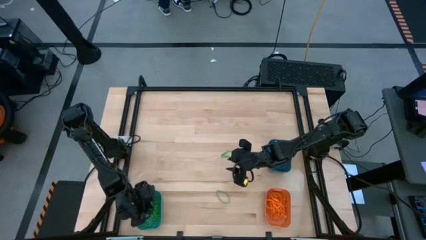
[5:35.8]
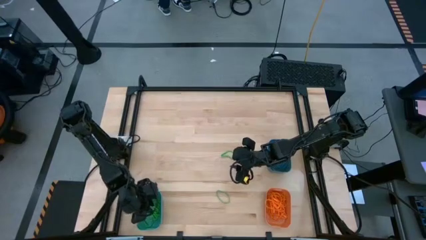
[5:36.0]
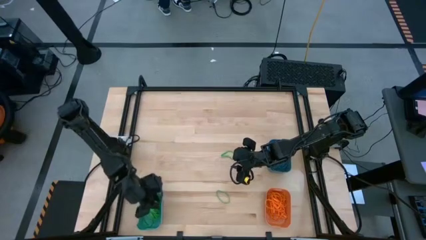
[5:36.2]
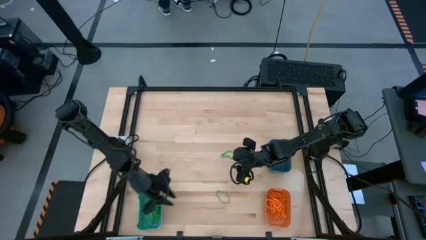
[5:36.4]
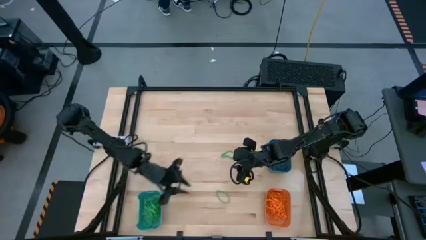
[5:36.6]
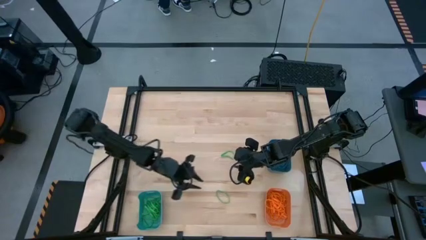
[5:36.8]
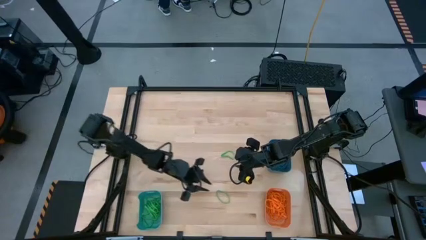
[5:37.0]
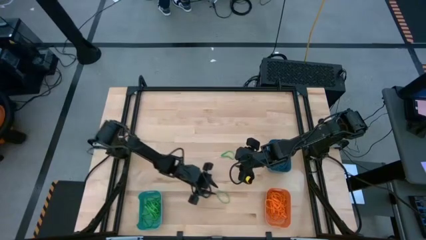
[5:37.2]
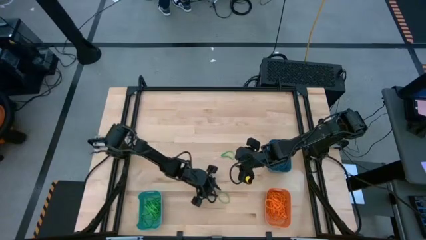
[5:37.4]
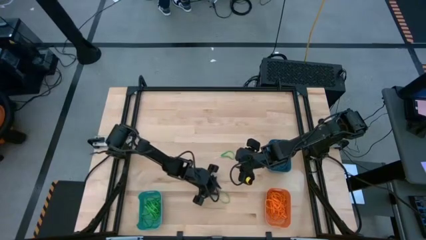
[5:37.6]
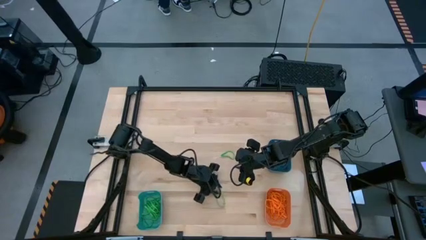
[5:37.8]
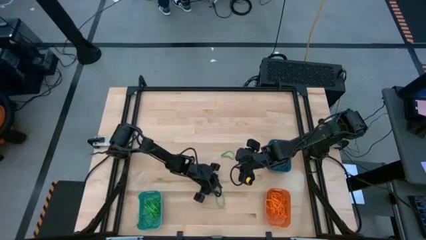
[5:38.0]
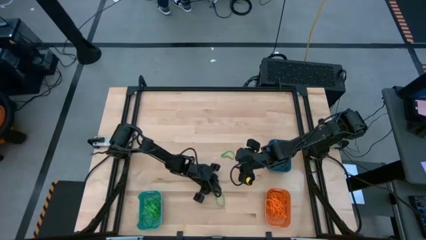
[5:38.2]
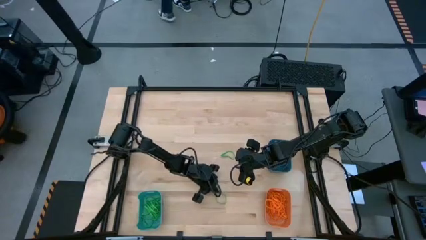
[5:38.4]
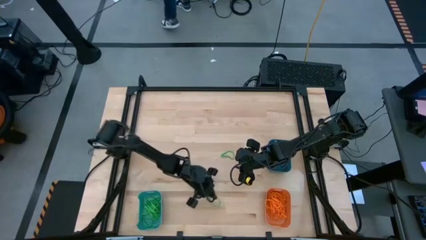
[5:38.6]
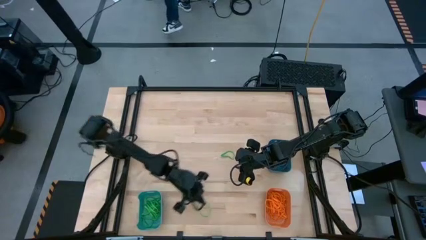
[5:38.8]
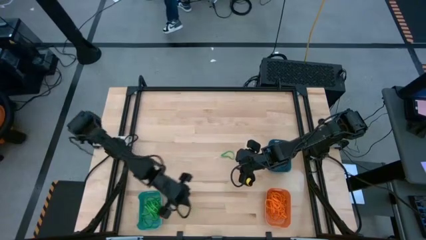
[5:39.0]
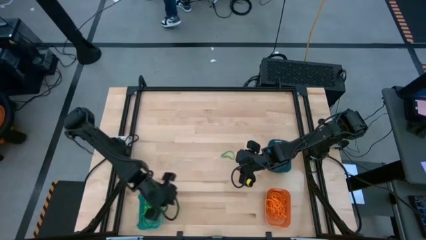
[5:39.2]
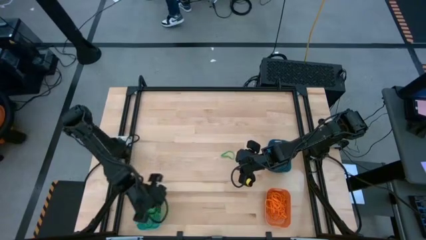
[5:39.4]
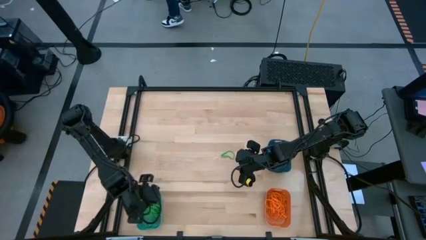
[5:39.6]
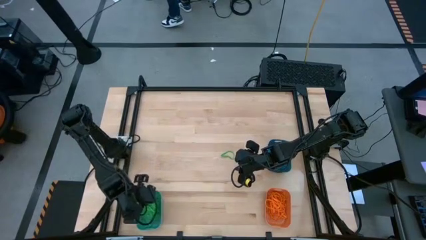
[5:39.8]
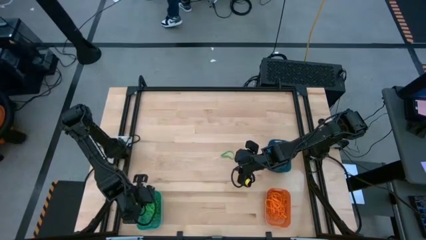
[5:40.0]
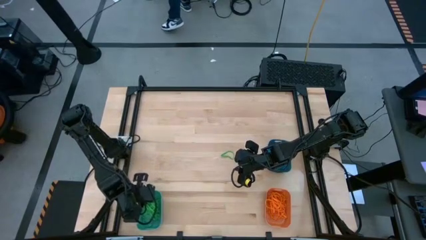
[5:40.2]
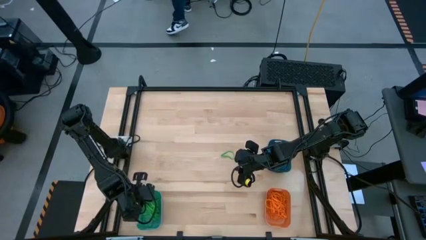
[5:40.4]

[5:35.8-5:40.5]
Task: Sort rubber bands into baskets
Put the green rubber band into the green bin

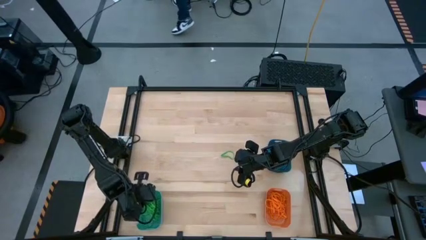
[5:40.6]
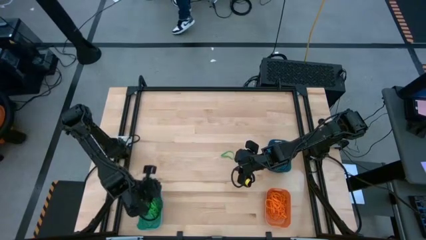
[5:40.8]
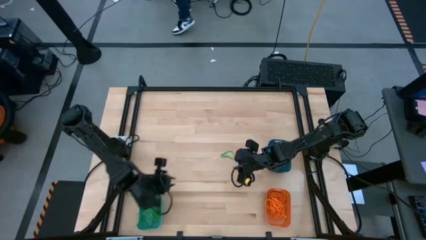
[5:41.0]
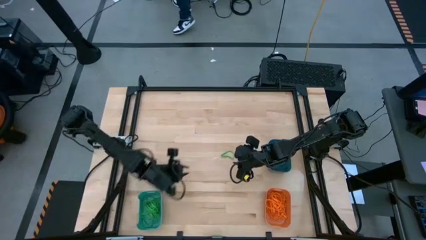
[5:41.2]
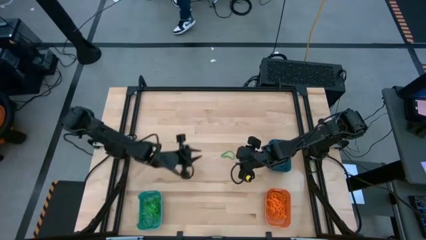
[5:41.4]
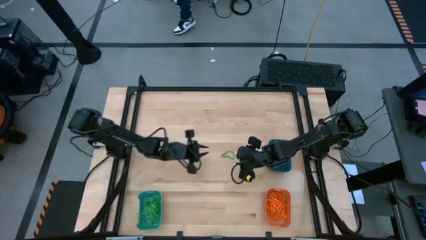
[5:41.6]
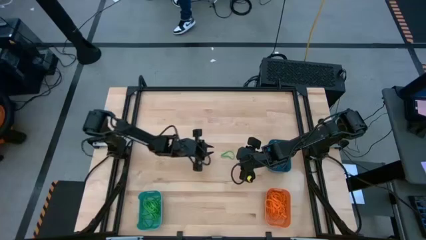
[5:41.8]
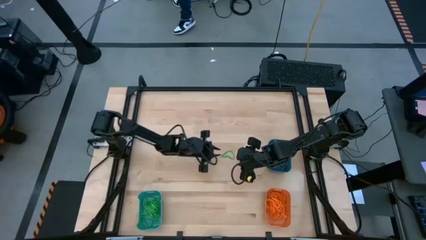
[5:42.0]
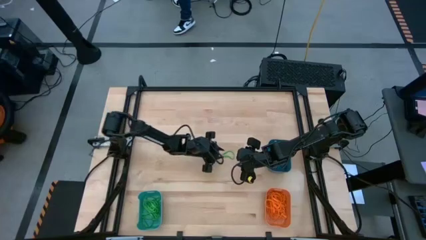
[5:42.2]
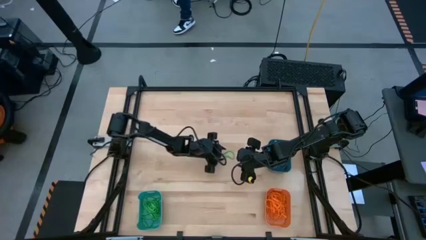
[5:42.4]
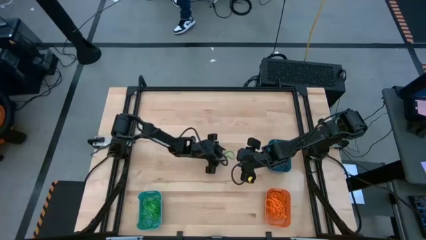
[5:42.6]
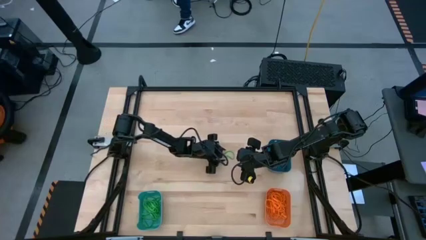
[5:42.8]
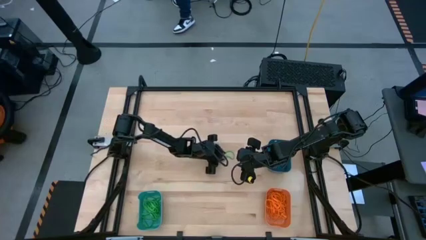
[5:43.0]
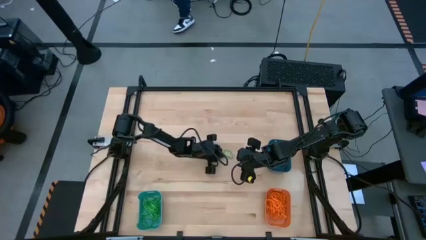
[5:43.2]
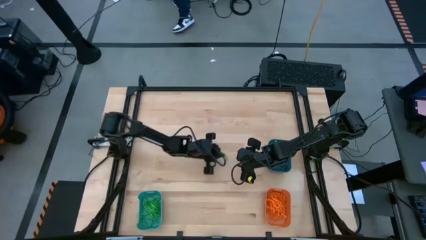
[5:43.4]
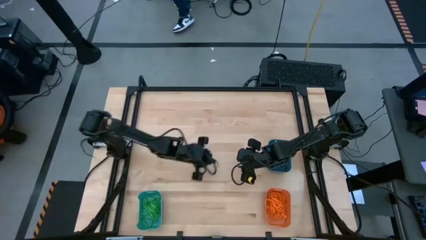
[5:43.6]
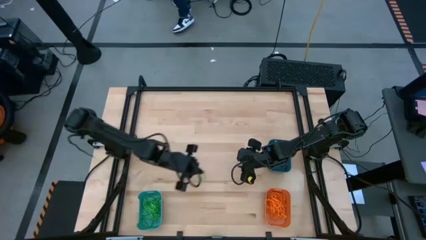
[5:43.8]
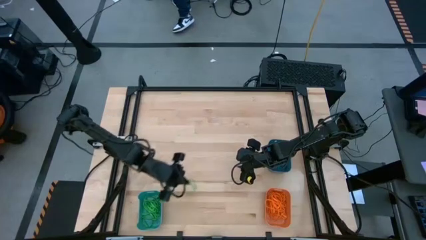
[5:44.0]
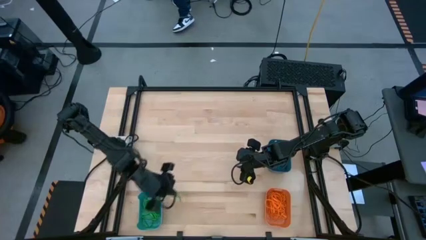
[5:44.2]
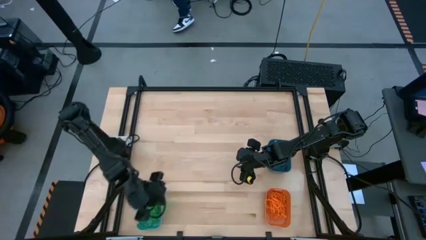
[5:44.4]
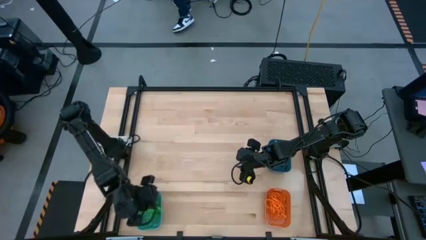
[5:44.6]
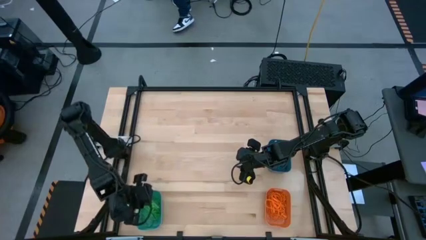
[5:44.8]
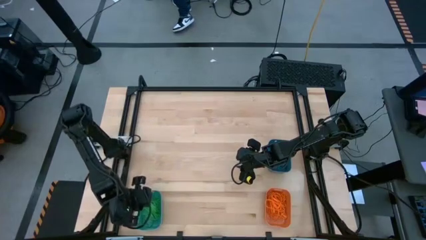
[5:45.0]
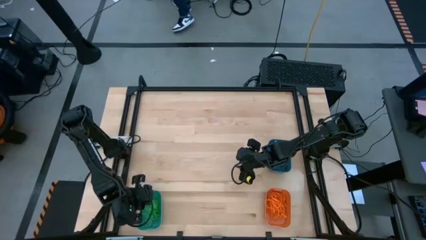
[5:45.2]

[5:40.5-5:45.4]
Put the green rubber band into the green bin

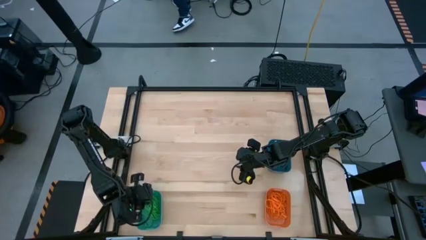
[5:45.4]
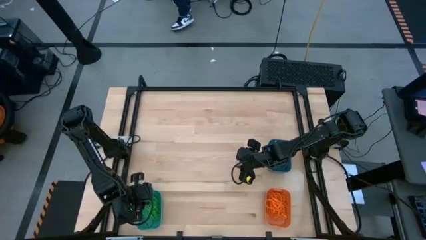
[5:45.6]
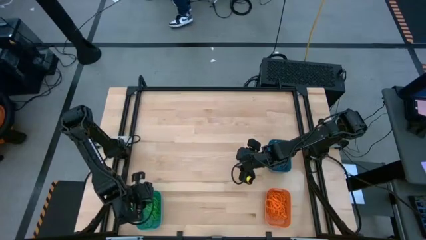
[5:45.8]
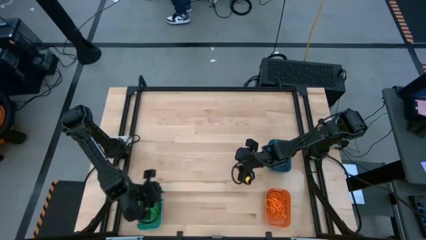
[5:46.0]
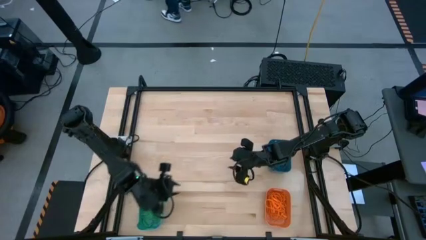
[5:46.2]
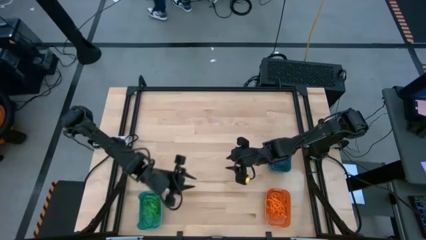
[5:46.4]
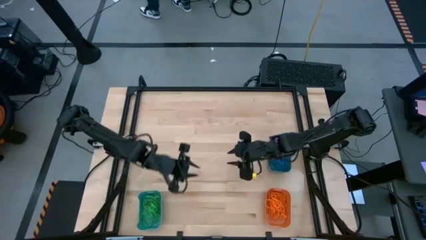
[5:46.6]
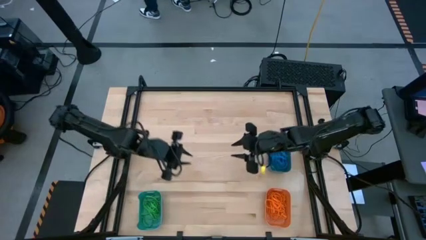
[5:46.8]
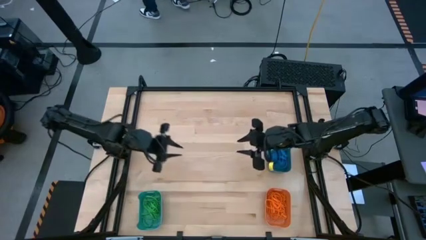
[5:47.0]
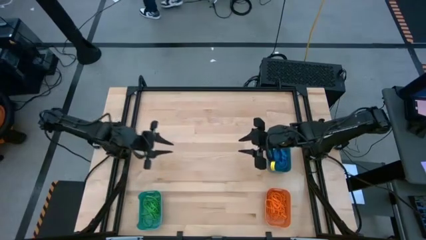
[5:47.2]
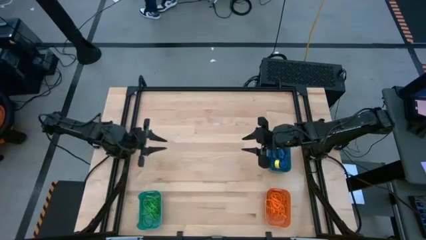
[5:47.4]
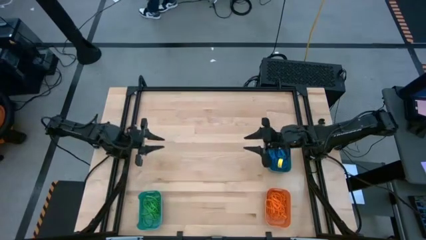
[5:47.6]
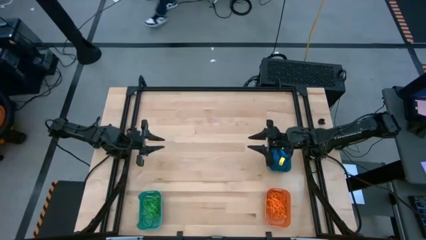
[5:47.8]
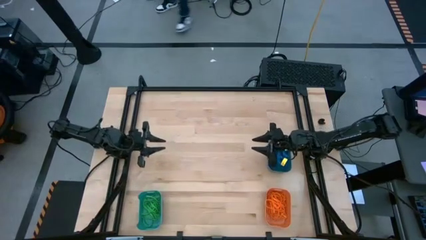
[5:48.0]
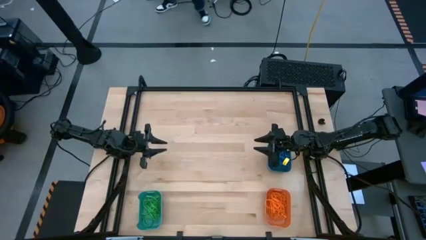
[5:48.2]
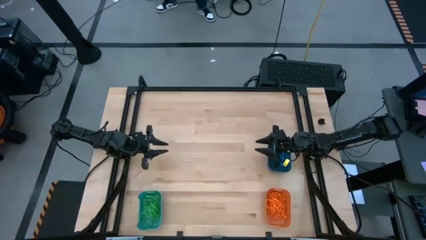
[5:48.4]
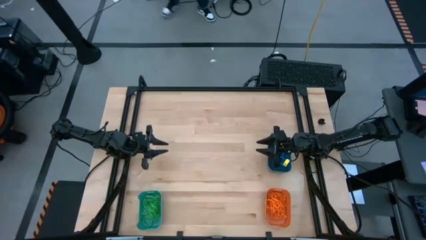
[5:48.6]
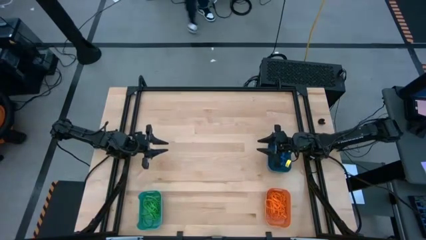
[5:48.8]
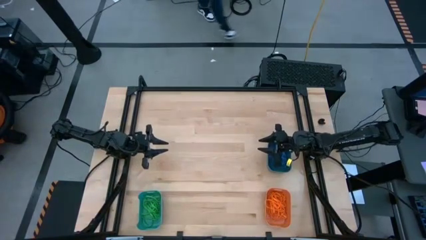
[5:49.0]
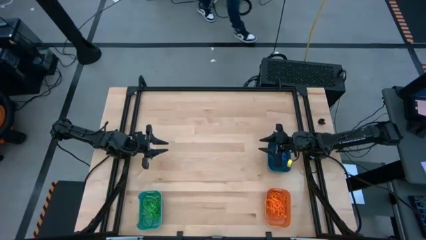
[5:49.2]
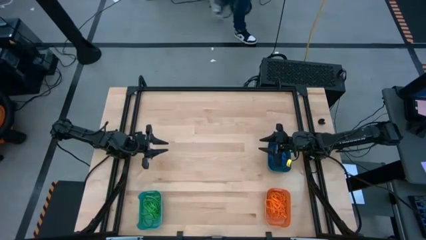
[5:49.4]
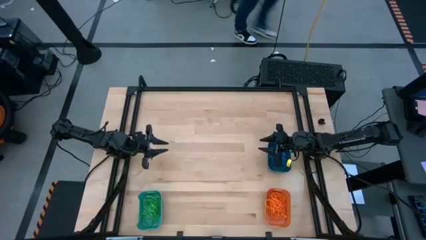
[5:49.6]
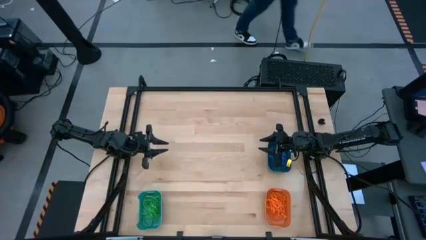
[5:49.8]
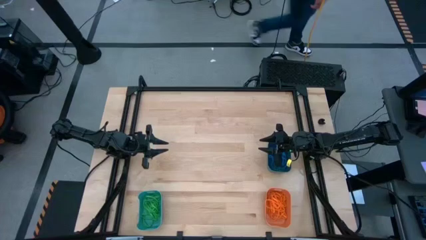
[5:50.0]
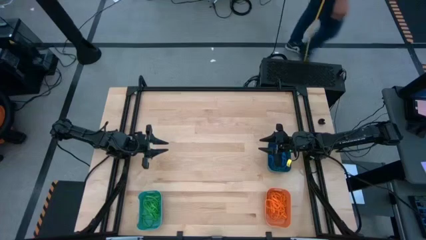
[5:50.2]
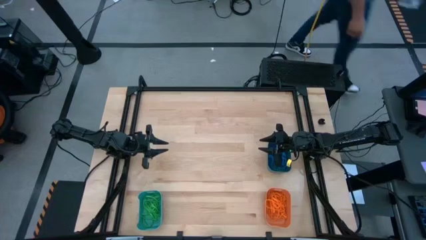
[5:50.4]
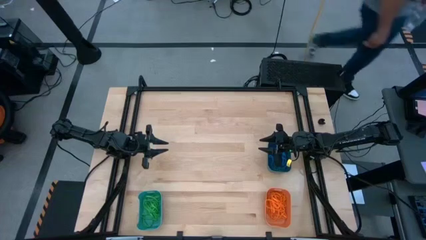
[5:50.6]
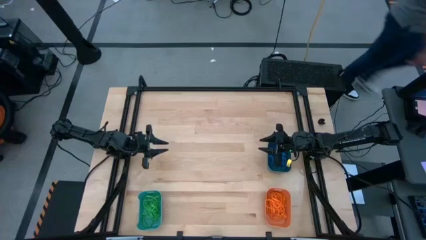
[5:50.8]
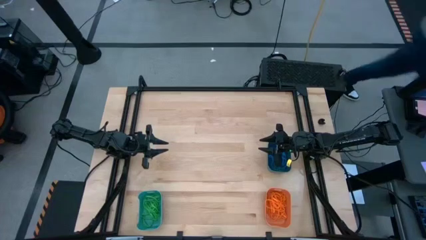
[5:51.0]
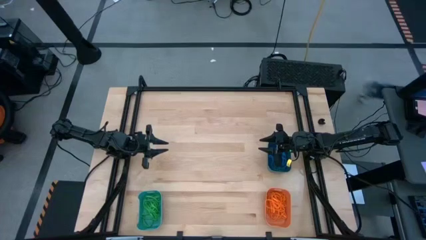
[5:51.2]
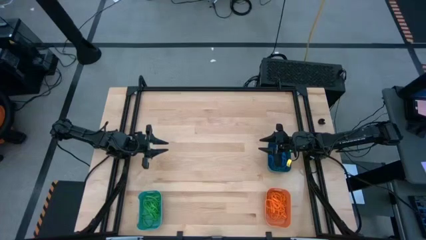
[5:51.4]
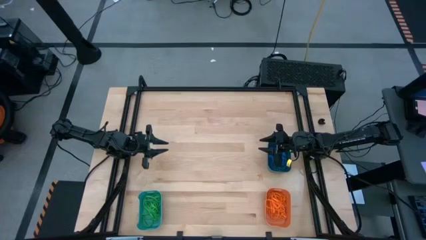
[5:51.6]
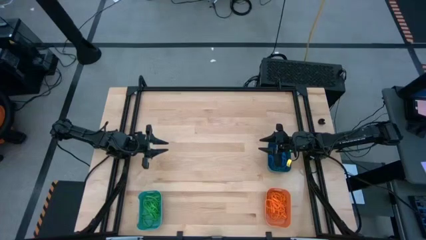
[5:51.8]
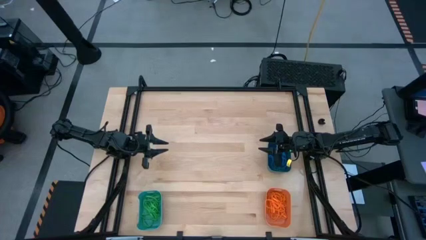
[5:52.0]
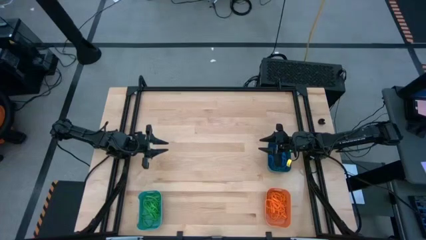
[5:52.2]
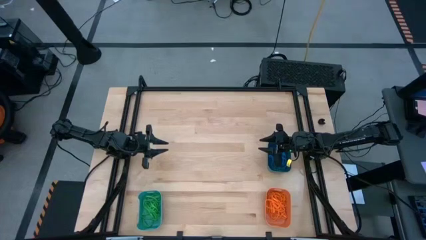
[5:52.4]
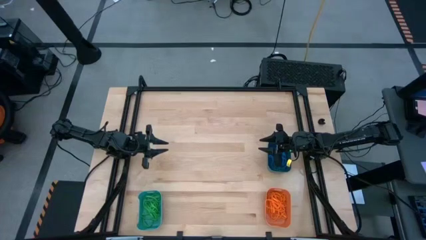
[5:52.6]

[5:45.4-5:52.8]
Return to Home Position
